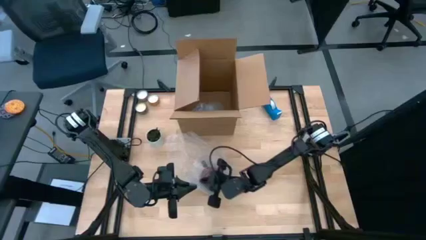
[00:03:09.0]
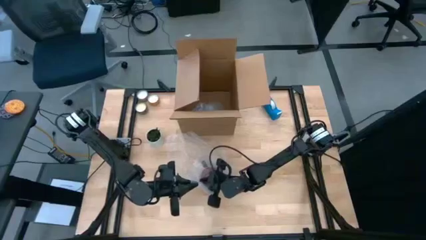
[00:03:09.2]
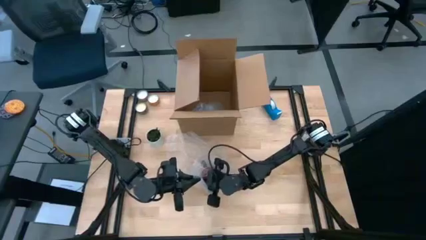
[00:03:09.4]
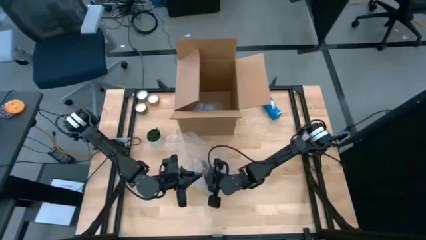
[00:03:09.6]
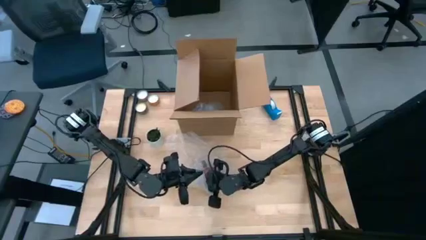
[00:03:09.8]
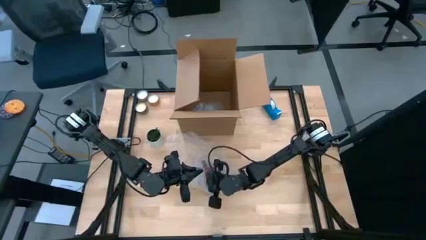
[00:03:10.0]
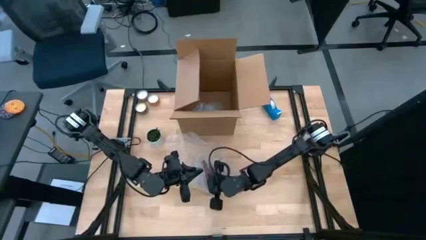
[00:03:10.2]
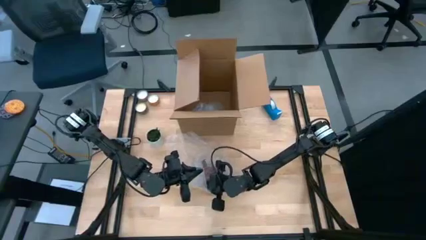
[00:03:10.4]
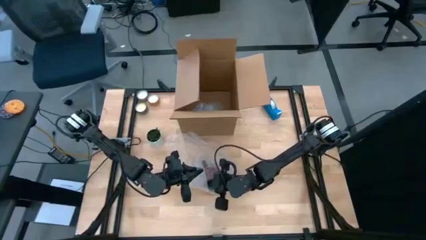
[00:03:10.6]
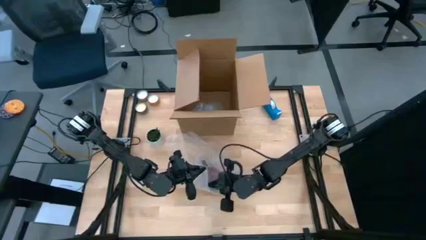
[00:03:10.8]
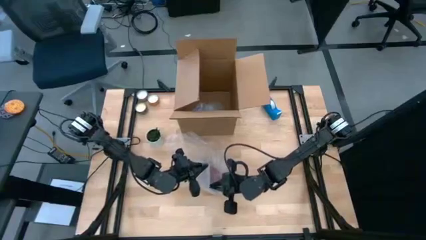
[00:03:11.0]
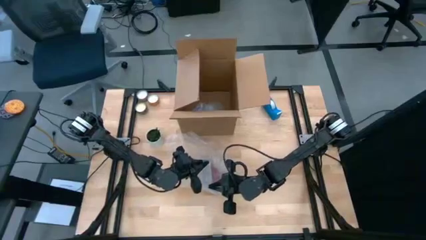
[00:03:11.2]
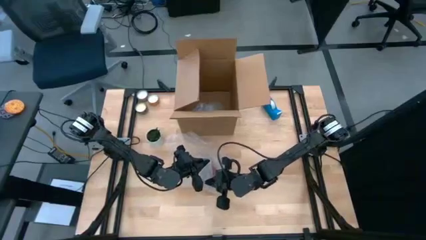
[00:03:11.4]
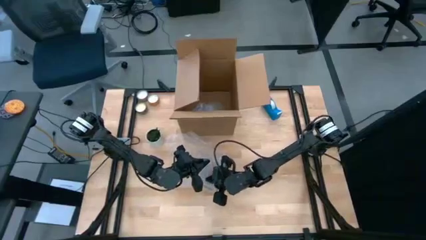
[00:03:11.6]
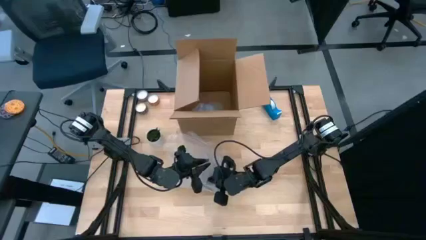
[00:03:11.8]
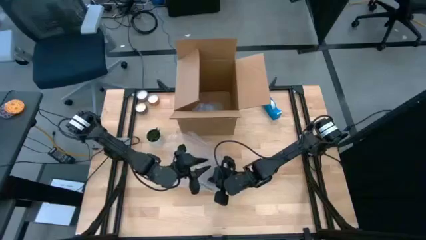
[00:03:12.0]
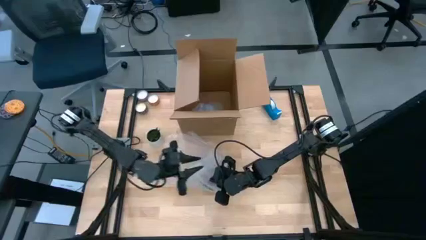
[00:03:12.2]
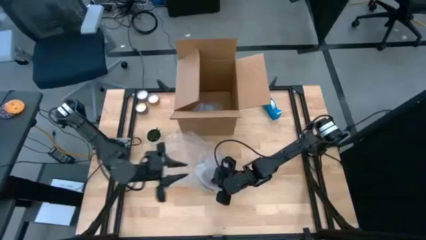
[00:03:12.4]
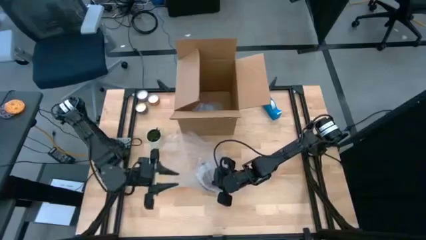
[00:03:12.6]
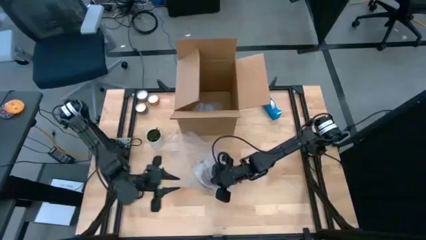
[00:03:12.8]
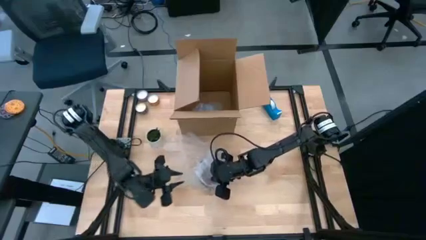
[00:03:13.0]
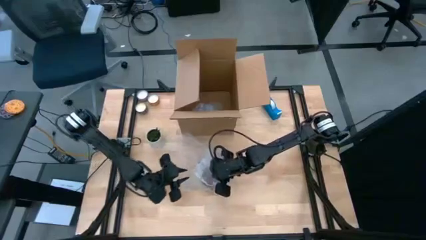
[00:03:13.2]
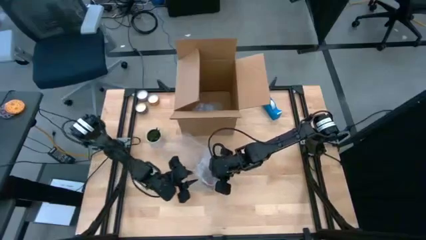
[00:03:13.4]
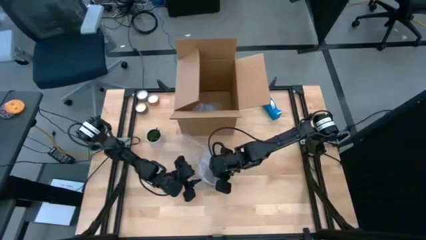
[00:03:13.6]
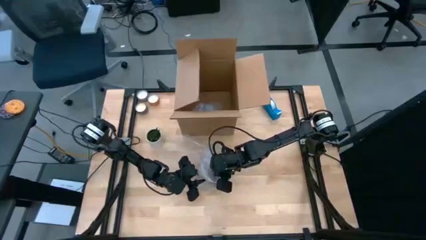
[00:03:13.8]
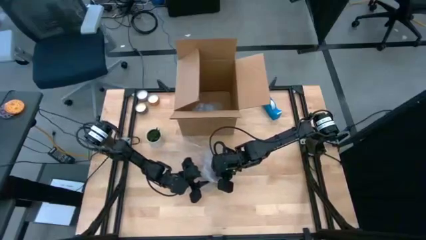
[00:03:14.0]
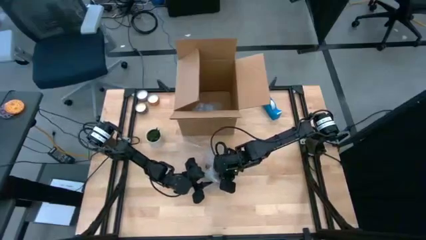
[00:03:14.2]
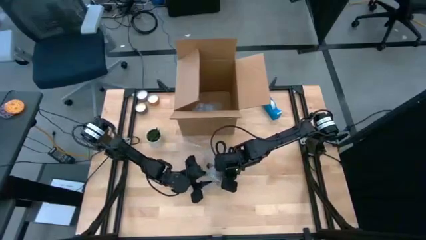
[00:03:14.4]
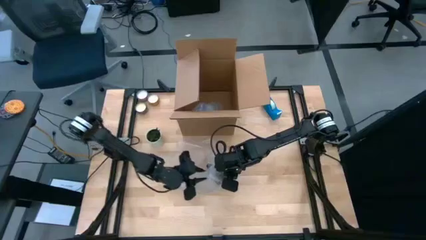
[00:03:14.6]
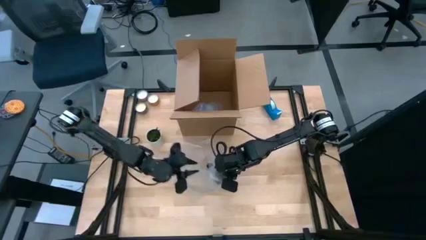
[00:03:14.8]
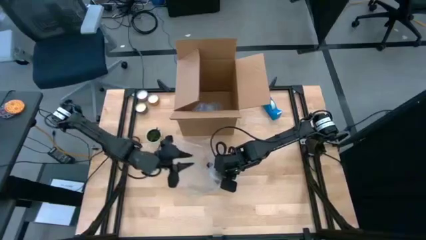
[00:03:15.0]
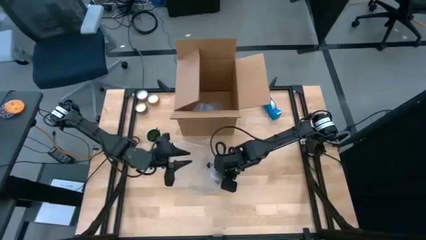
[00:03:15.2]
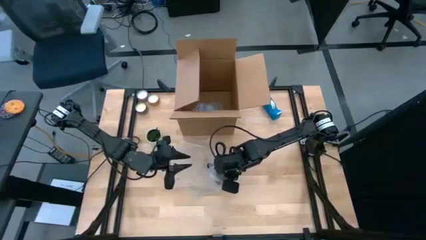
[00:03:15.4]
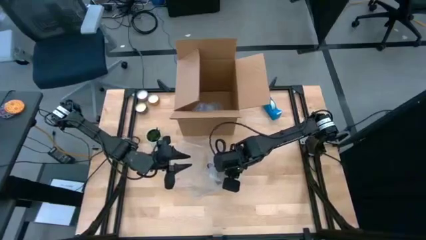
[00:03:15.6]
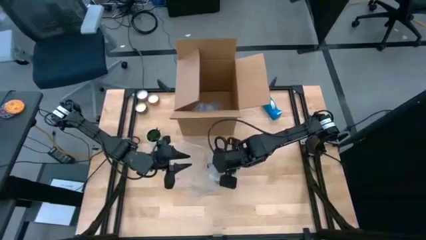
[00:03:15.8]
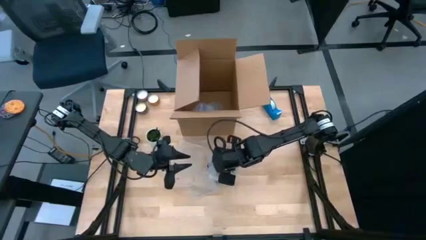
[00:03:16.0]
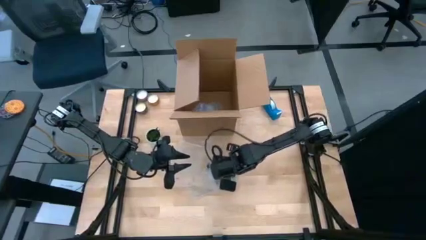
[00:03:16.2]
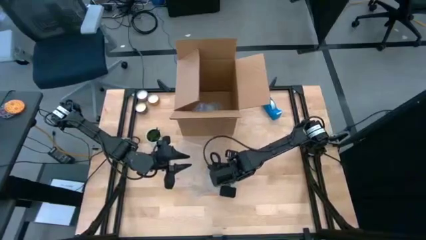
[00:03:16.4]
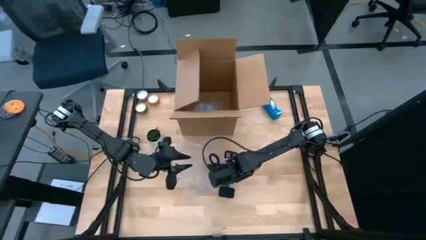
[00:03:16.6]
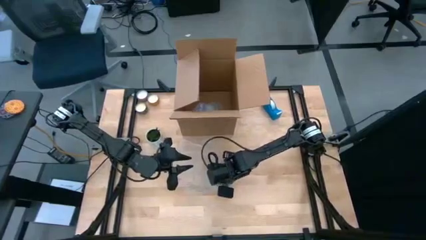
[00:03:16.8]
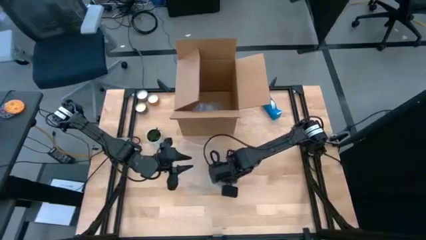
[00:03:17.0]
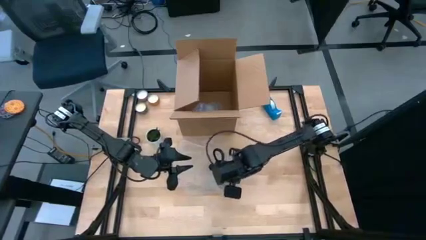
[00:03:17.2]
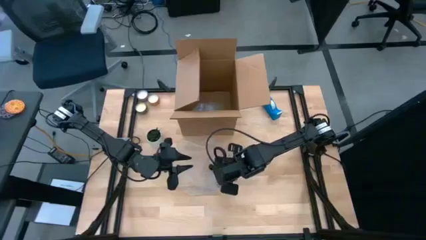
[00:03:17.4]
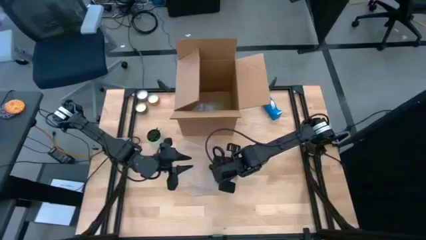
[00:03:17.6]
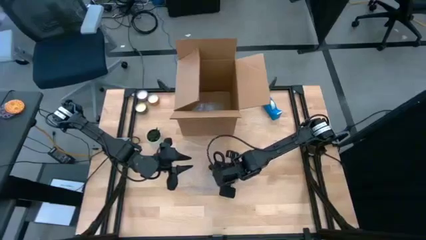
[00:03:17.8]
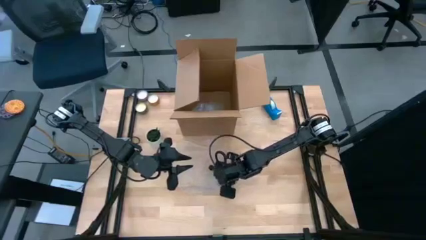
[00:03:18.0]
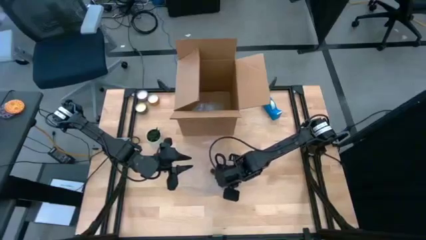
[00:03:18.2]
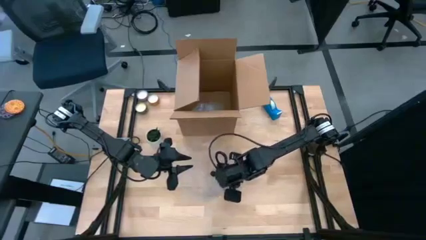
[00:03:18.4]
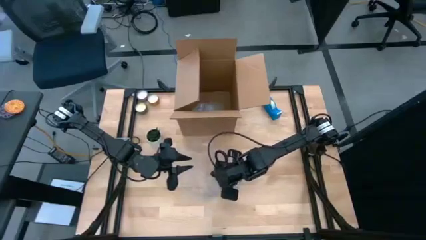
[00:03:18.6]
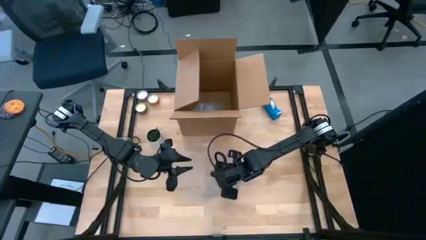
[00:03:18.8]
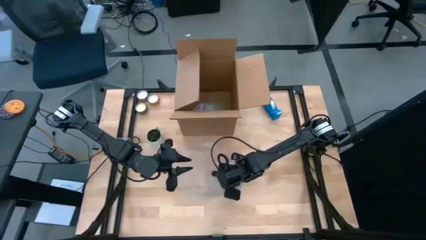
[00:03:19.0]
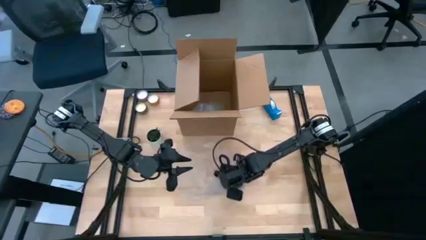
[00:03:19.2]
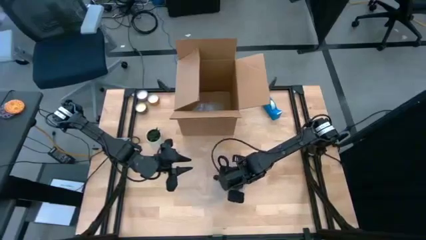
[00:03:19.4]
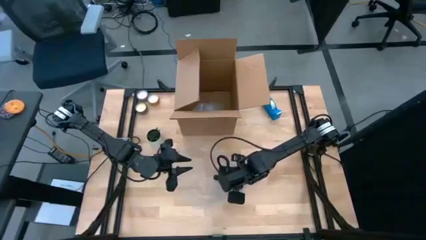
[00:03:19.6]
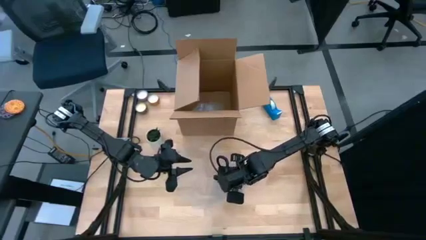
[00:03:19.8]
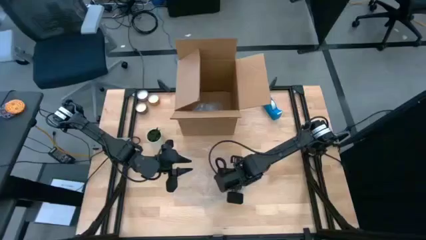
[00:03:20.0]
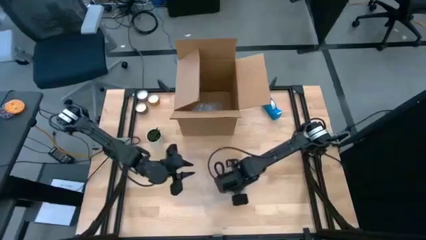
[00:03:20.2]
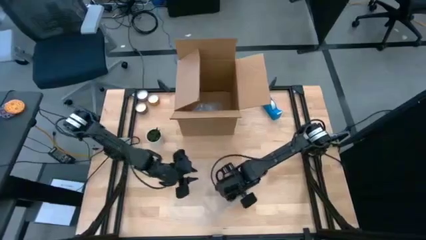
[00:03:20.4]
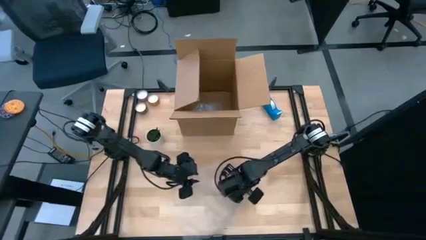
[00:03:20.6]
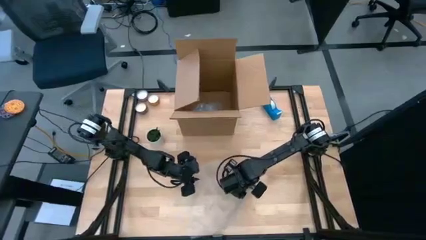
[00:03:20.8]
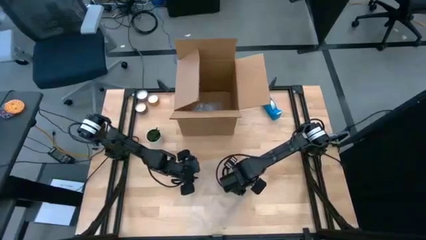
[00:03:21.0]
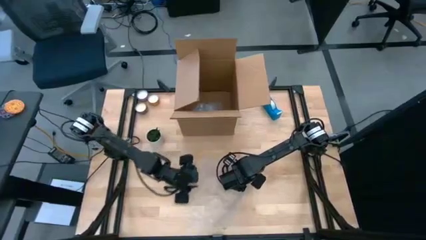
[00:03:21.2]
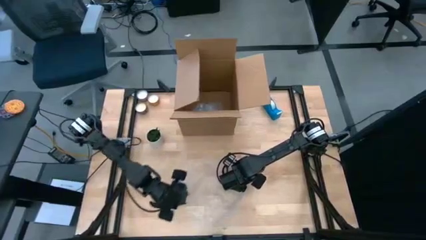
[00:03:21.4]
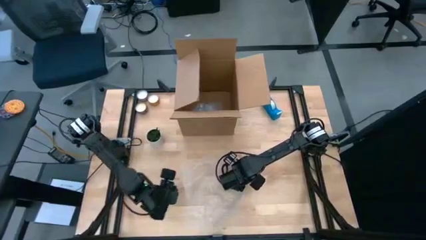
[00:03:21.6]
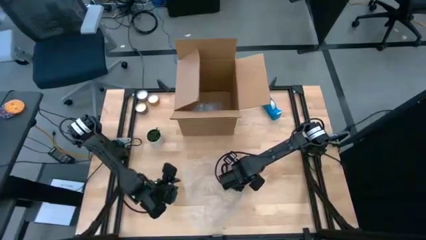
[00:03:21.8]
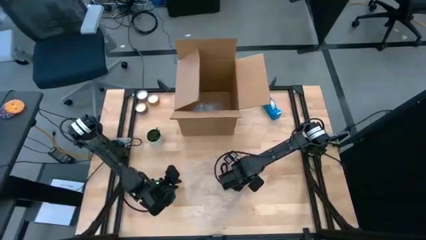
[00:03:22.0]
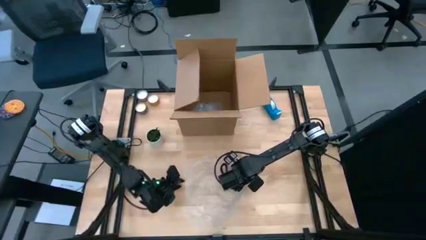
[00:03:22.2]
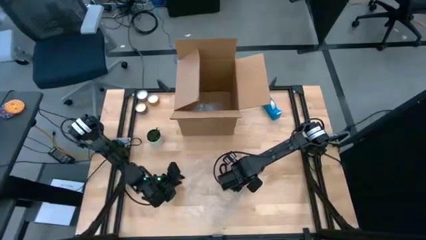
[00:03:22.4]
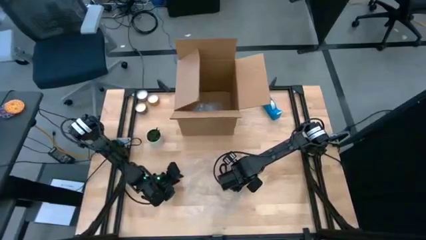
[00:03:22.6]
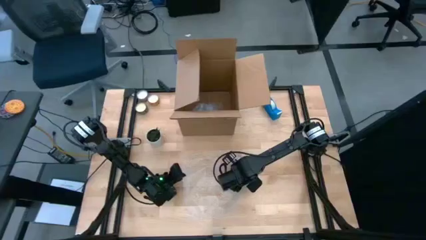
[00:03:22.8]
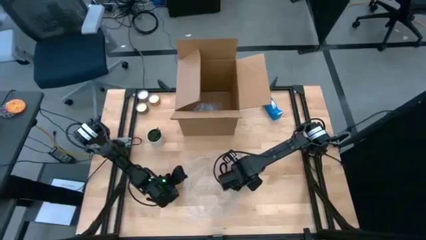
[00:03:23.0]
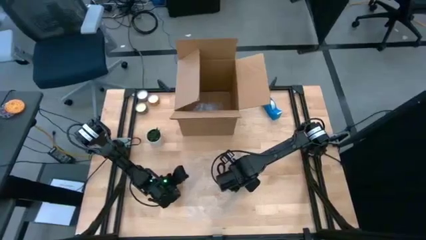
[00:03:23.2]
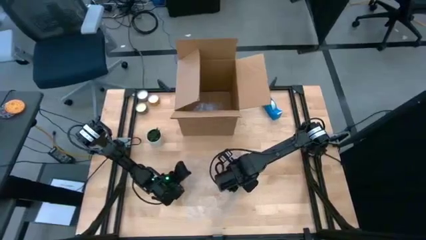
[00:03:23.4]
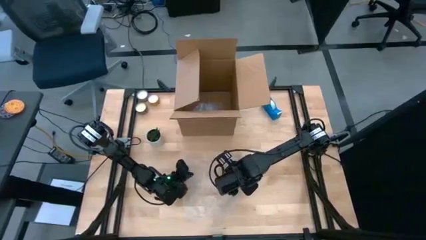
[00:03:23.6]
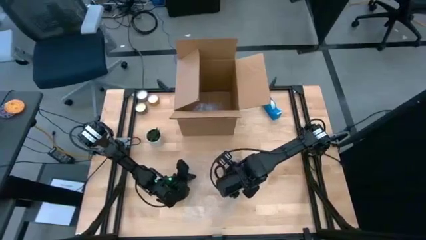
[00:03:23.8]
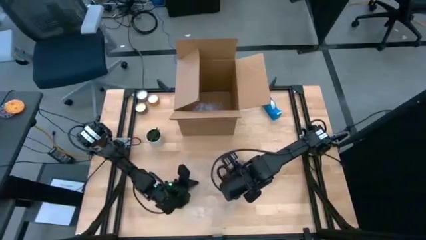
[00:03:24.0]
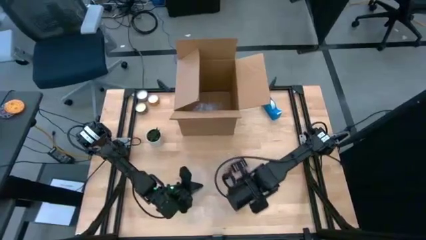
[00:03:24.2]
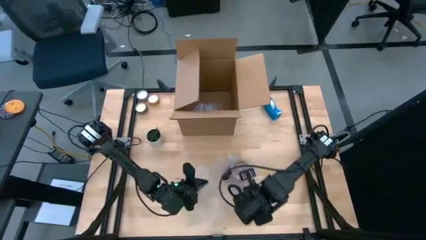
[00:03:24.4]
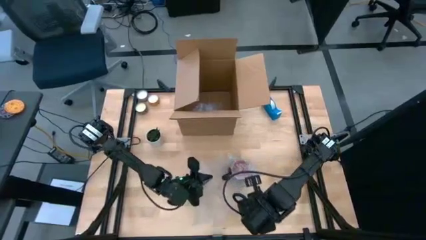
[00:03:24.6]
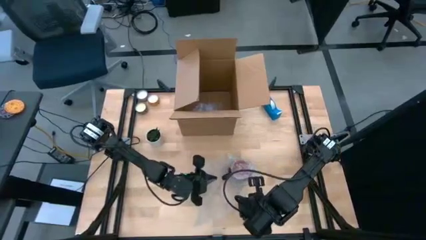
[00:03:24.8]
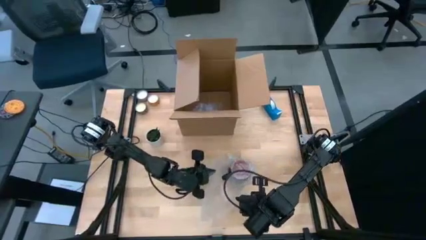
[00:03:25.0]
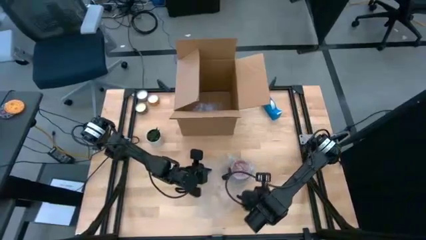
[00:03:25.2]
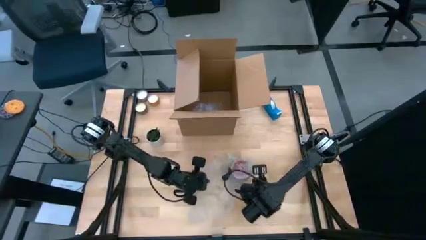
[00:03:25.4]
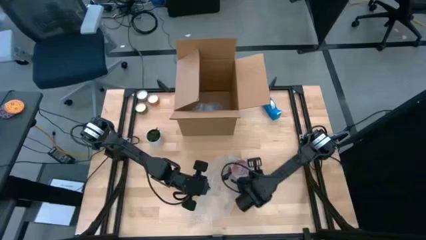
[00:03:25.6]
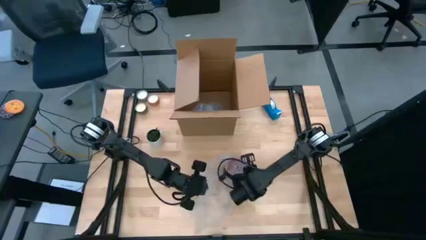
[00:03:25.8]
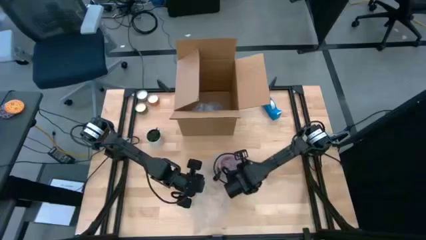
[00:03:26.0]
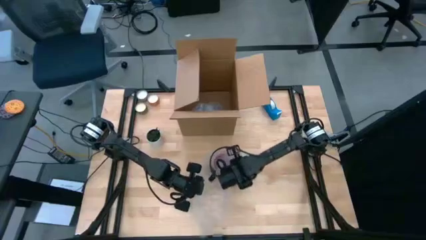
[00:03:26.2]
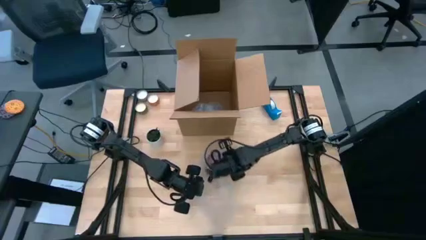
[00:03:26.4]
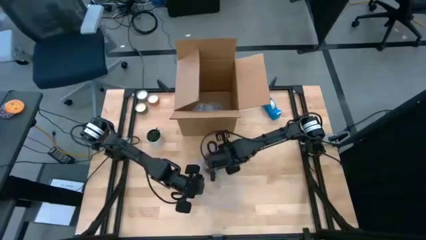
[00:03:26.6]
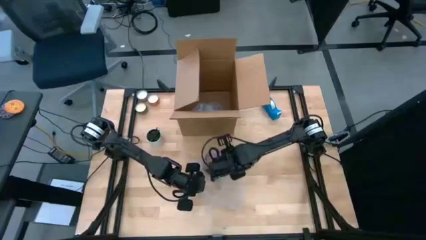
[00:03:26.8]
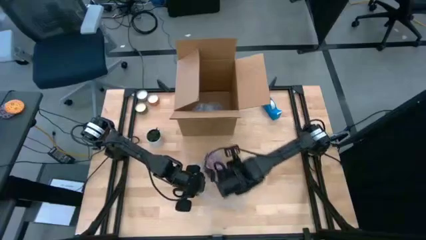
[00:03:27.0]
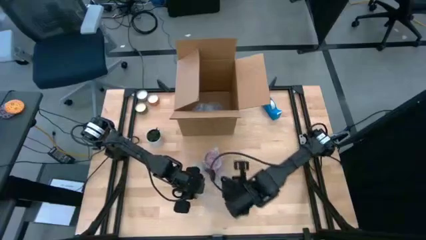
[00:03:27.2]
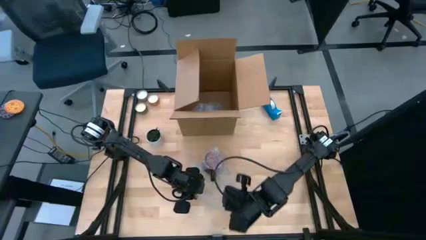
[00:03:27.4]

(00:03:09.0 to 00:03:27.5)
Task: wrap mug
Wrap the black cup with the transparent bubble wrap
